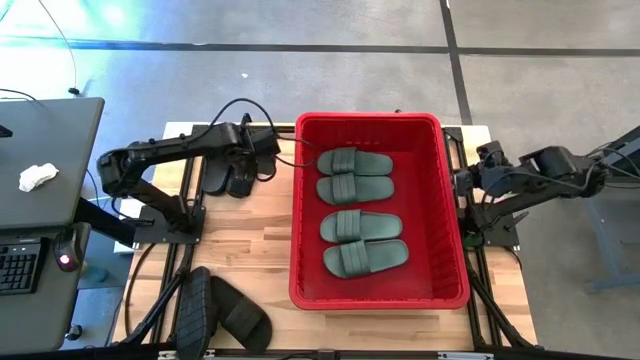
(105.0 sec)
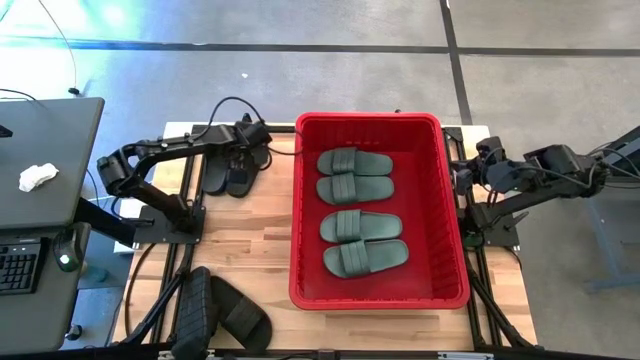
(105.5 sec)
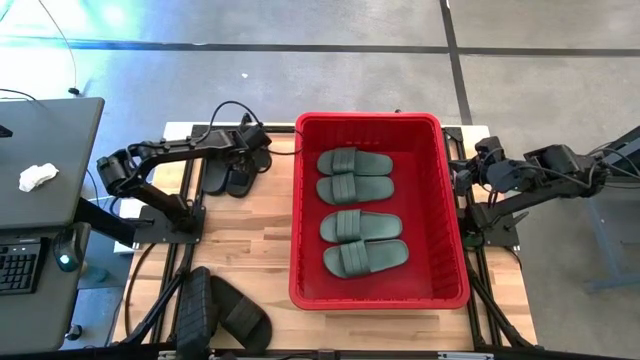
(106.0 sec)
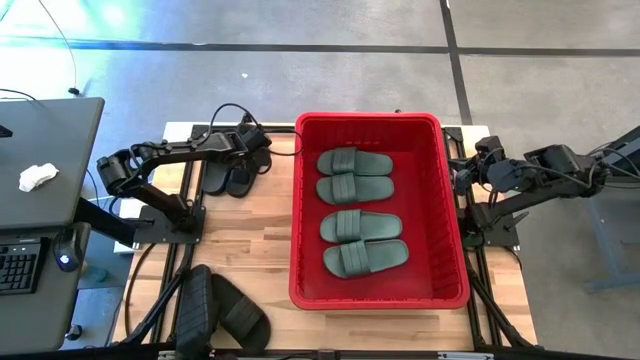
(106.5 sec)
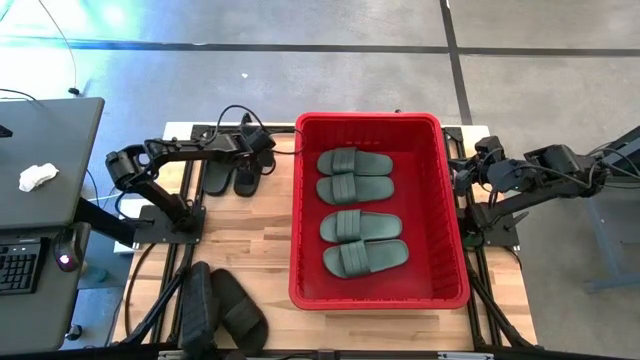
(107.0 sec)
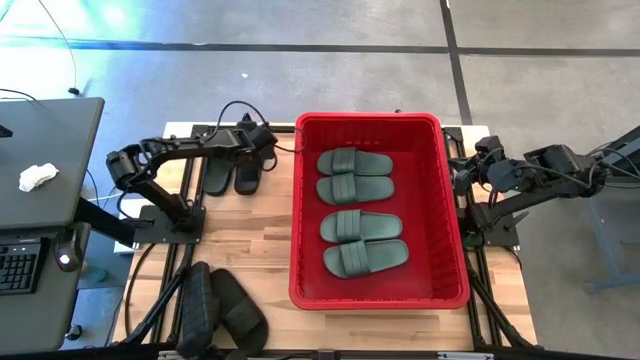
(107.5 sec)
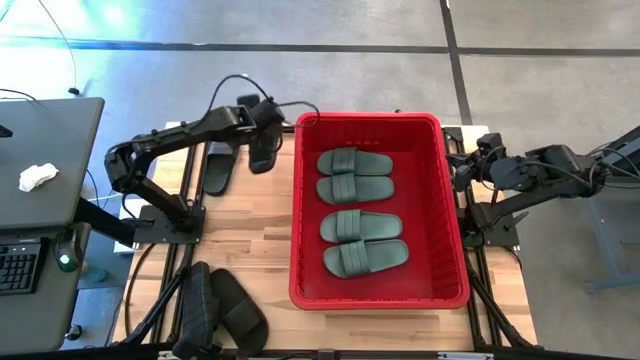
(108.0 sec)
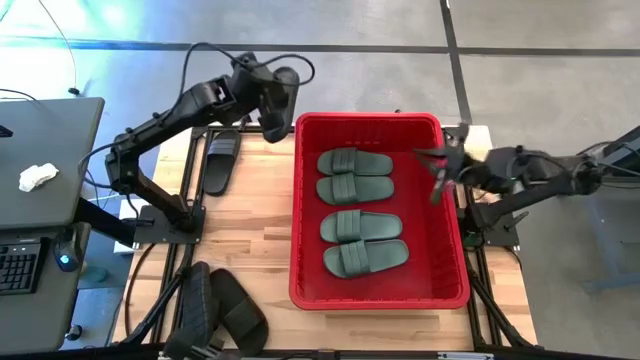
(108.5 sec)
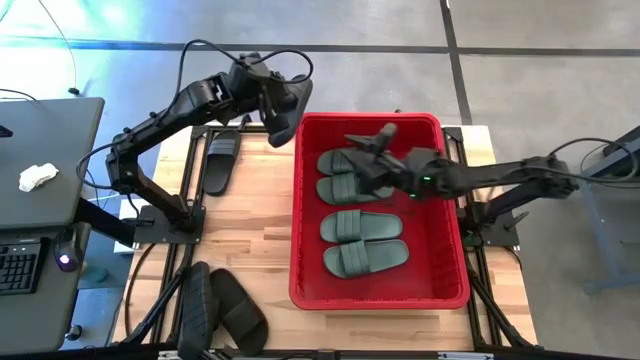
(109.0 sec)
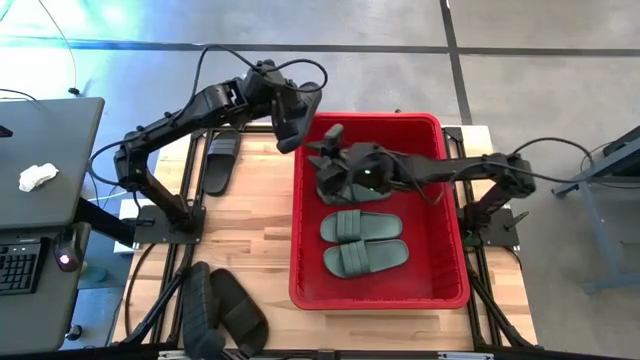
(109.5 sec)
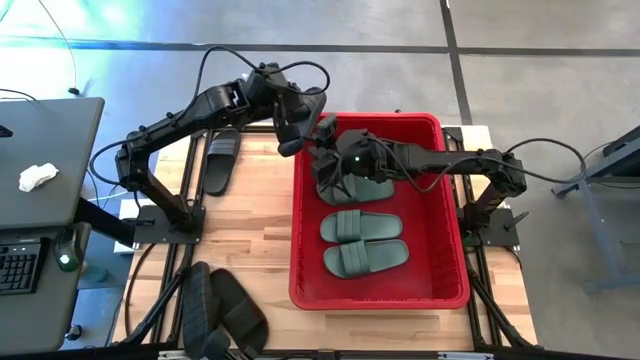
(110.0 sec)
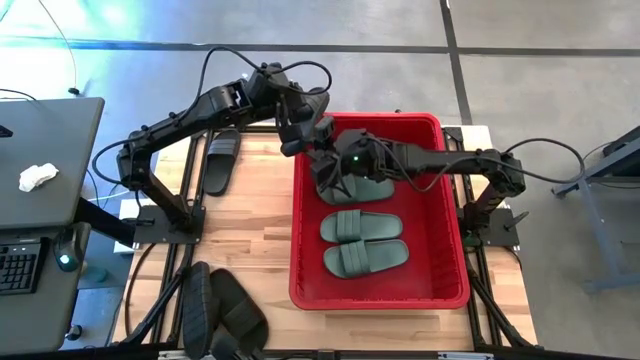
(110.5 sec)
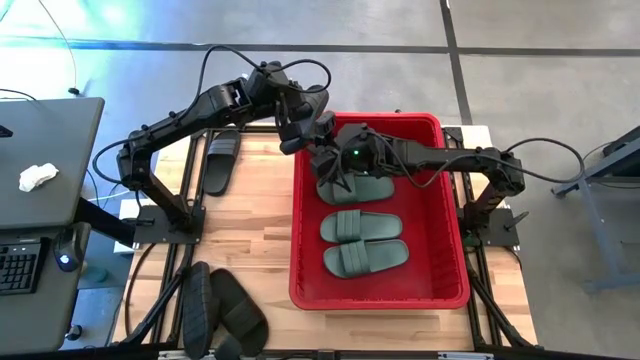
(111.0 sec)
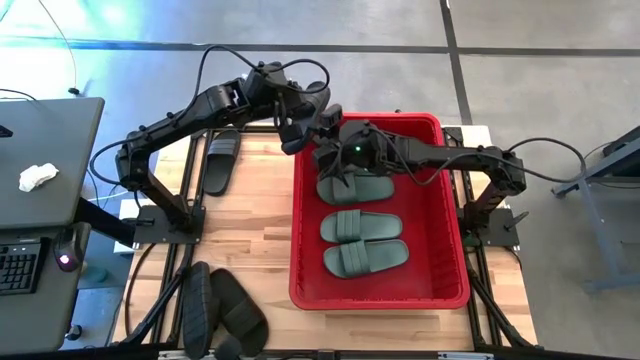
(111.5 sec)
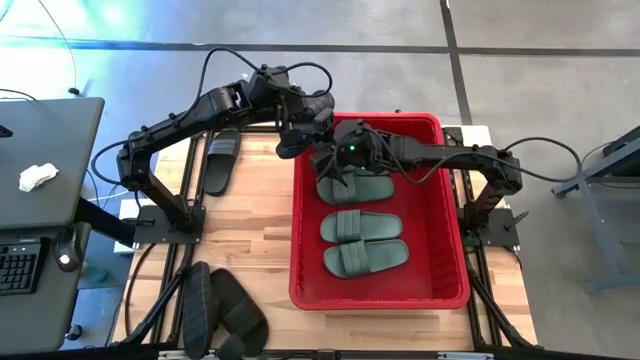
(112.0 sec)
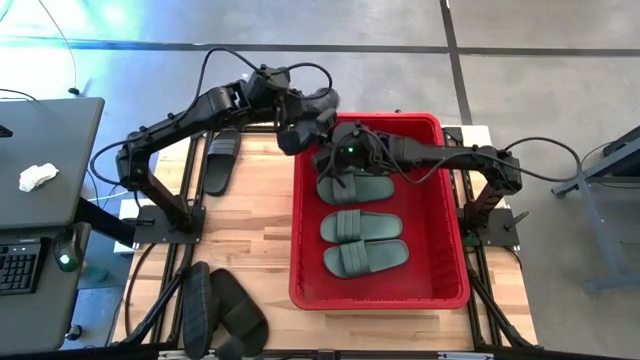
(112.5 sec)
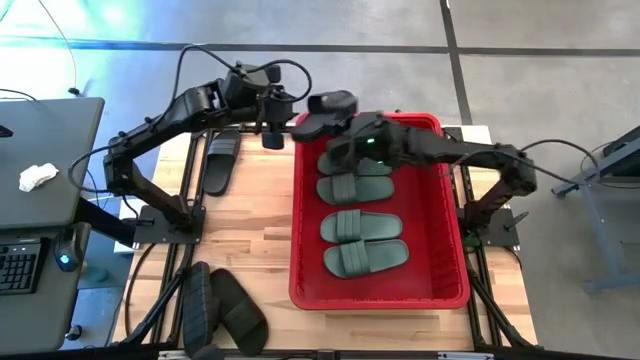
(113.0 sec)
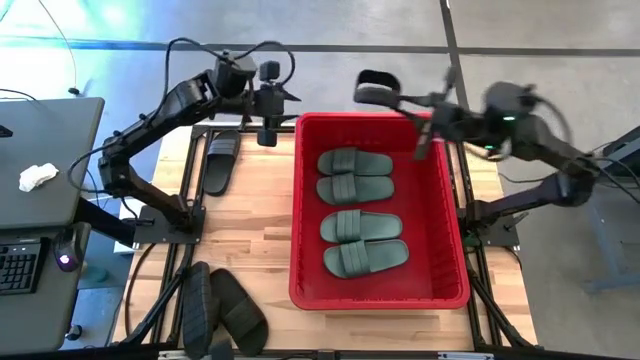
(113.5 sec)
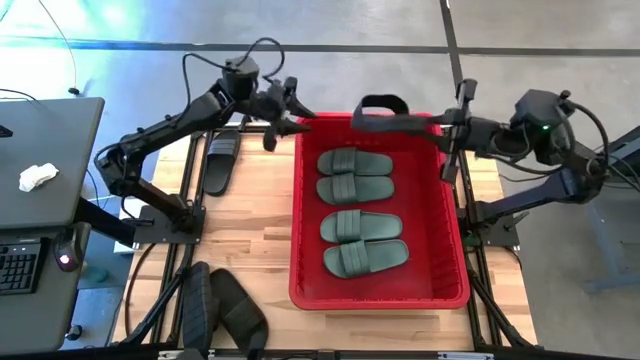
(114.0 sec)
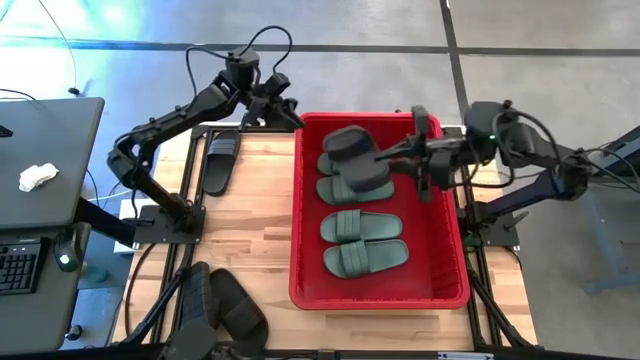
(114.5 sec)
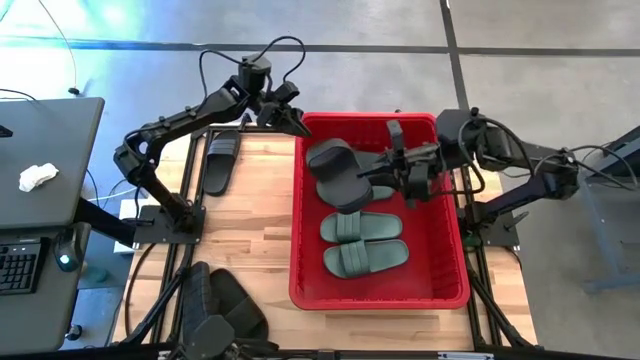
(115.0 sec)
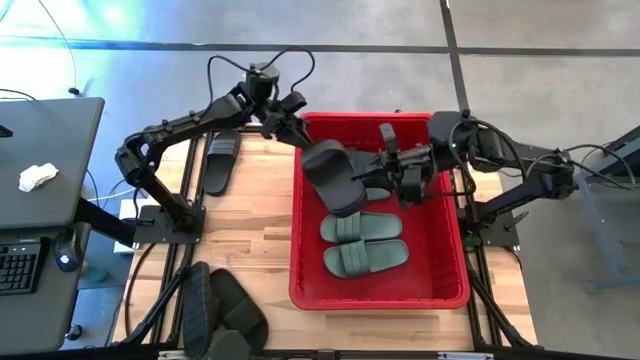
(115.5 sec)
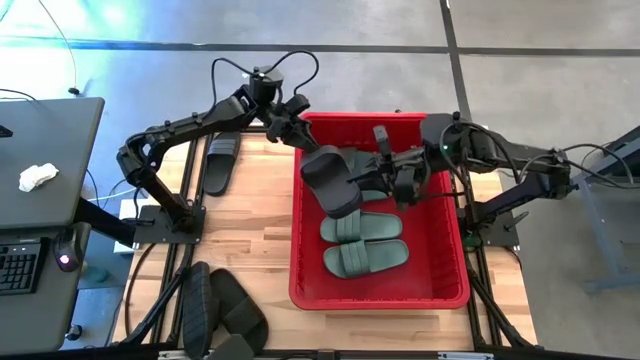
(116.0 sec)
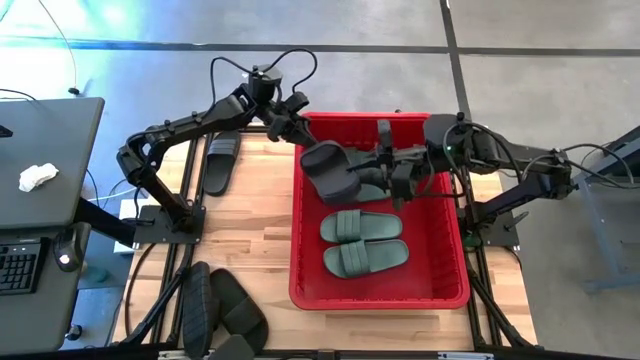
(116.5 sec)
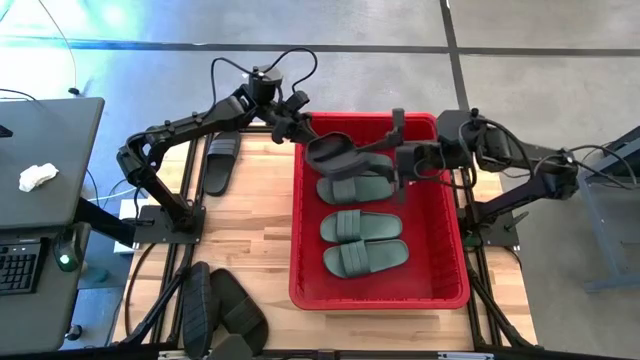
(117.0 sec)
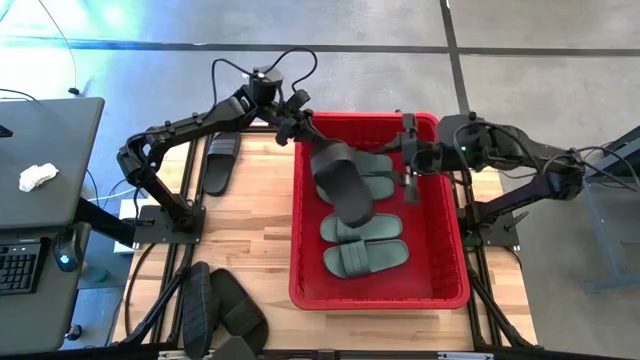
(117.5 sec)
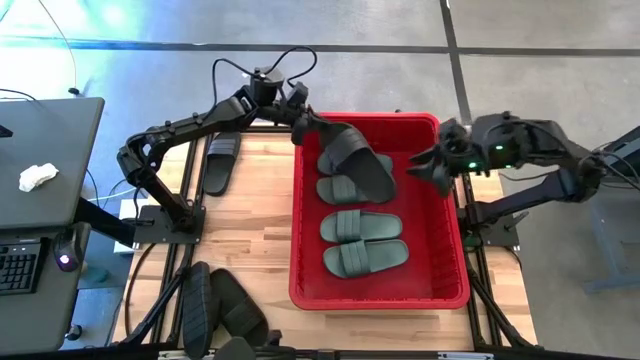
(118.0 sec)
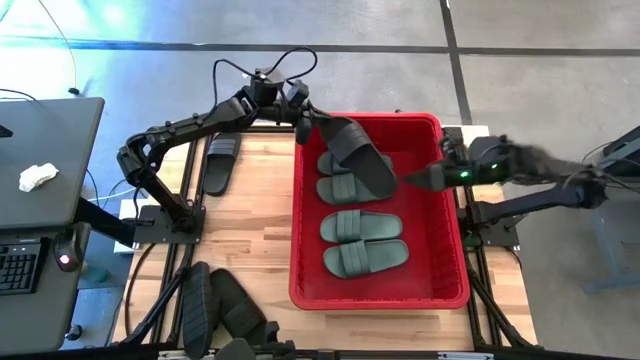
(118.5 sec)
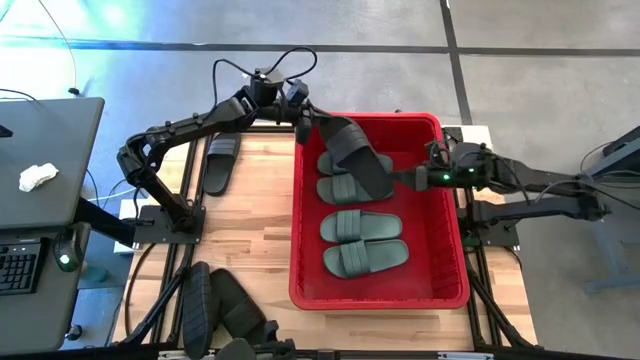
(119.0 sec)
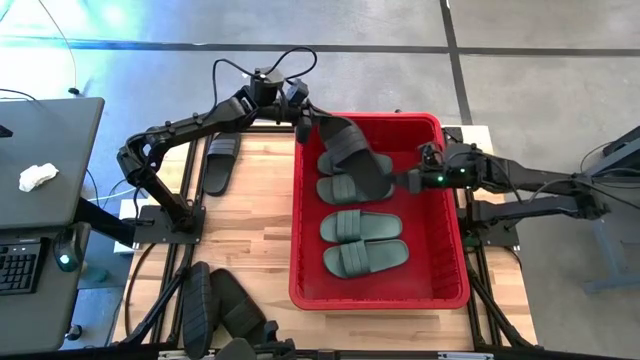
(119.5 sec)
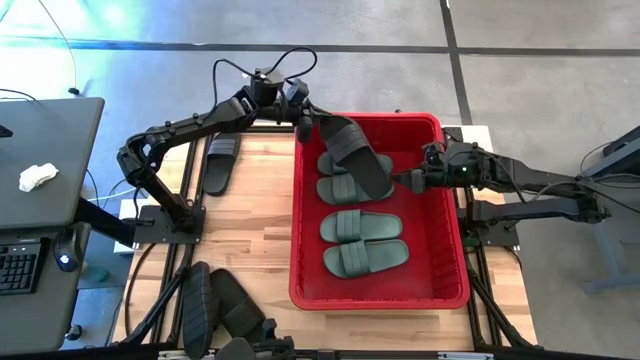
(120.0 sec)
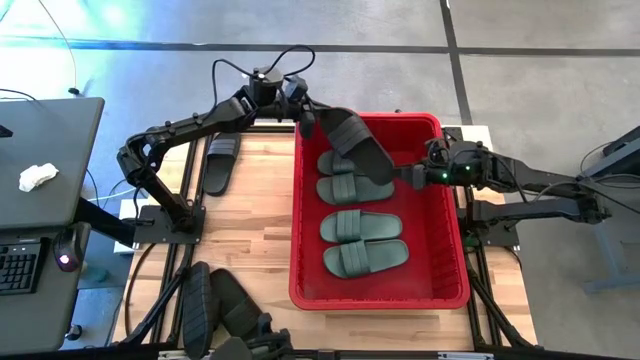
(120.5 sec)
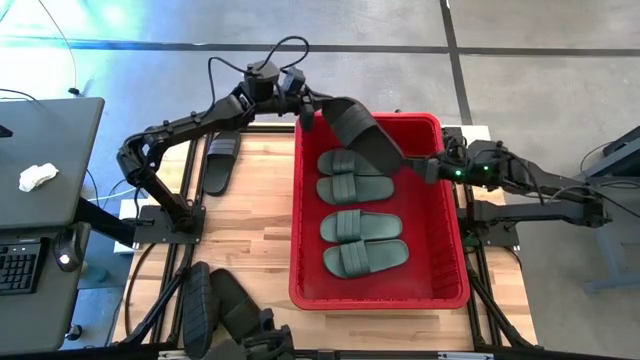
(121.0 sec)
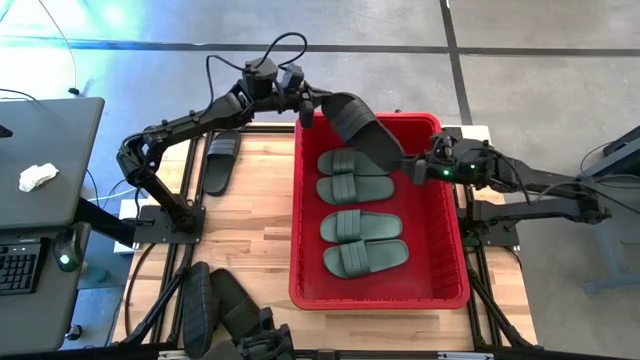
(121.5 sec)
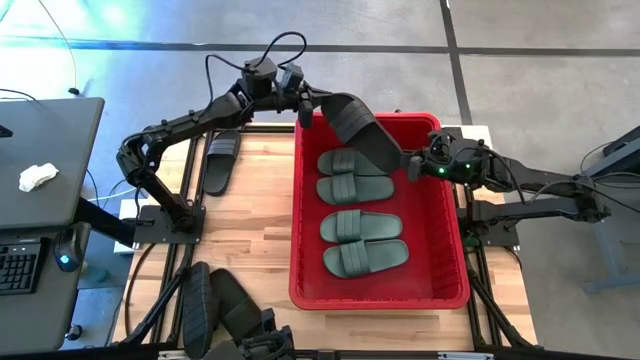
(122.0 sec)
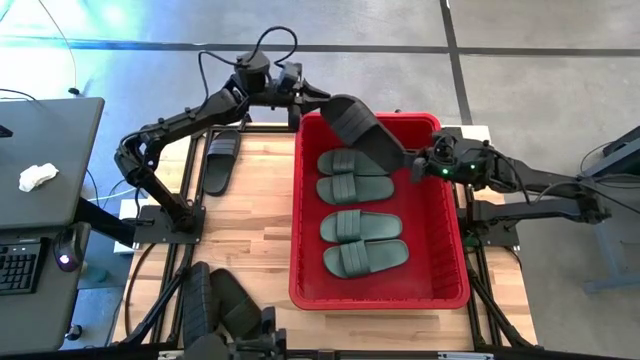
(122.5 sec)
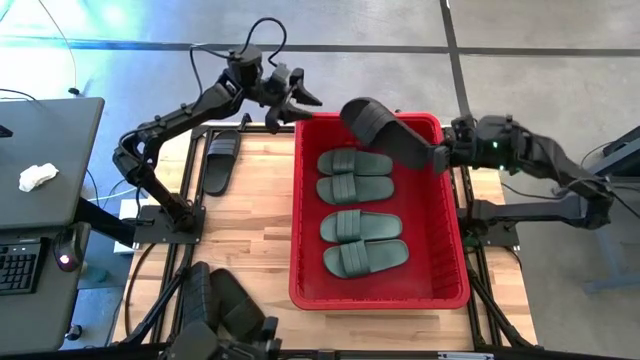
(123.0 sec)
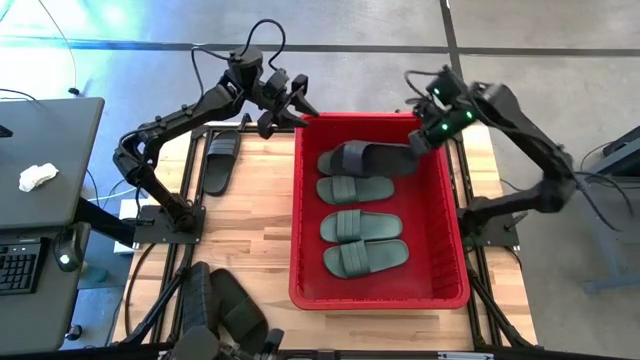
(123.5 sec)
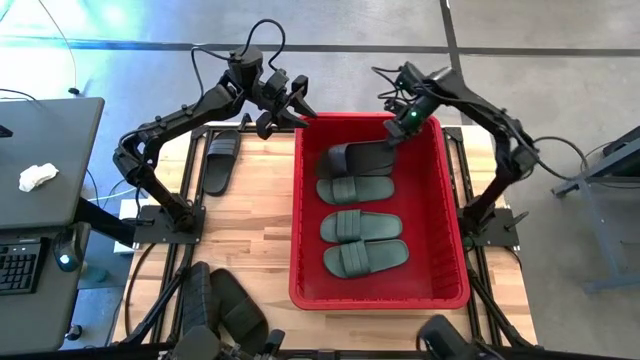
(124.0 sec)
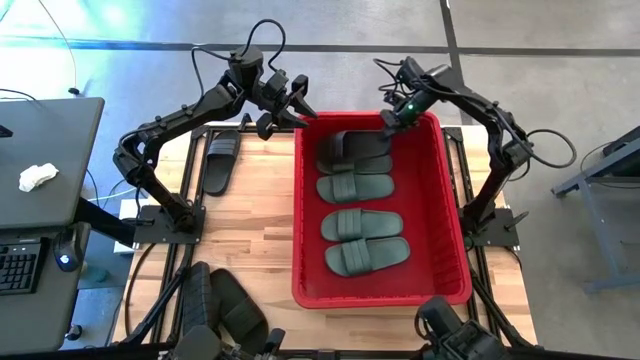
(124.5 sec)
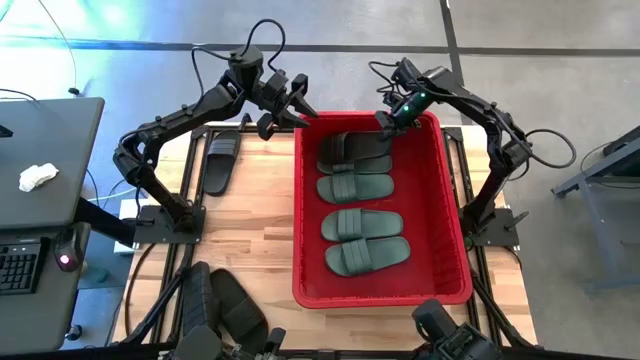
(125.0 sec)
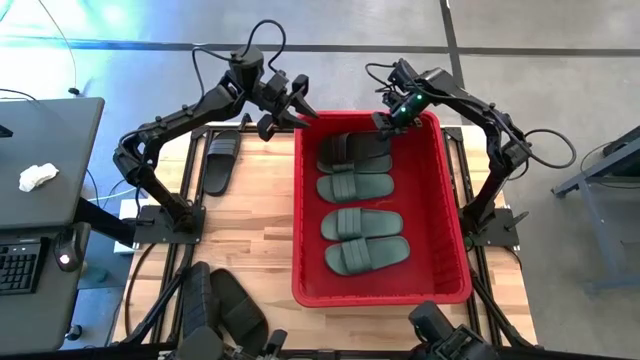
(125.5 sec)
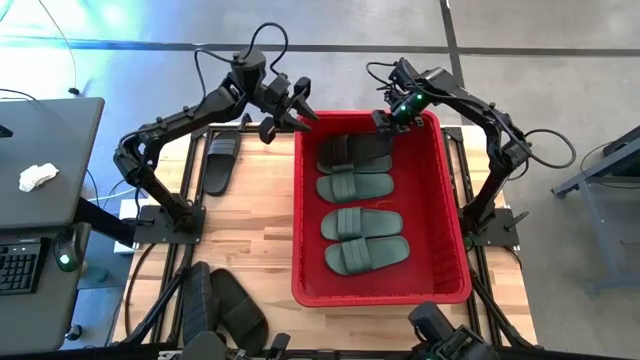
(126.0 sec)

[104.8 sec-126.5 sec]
Task: Pick and place slides into bin
Put the black slide into the red container
